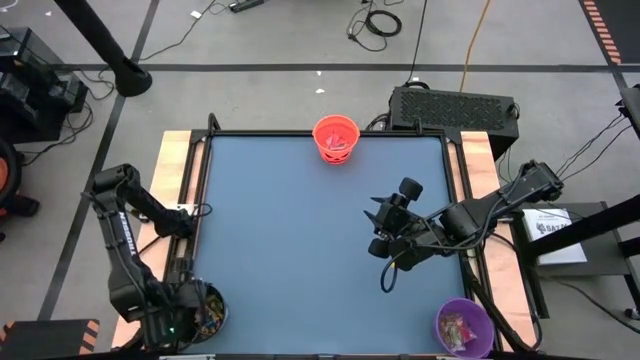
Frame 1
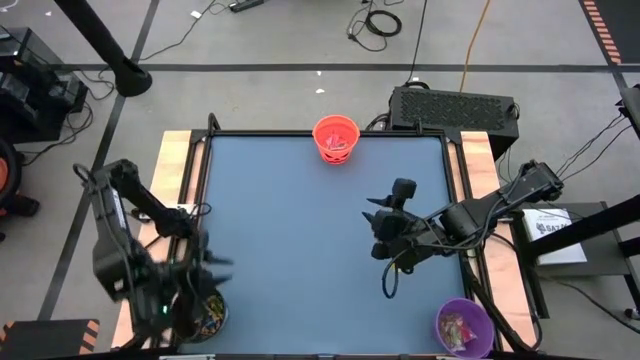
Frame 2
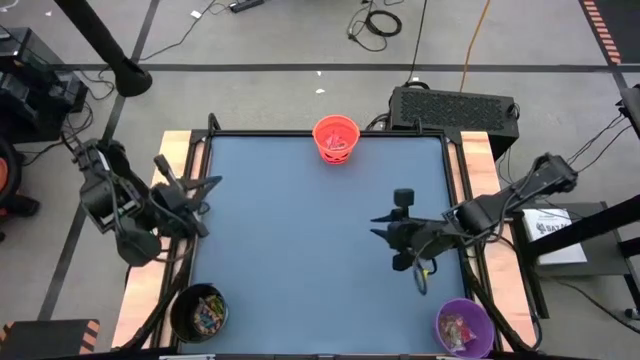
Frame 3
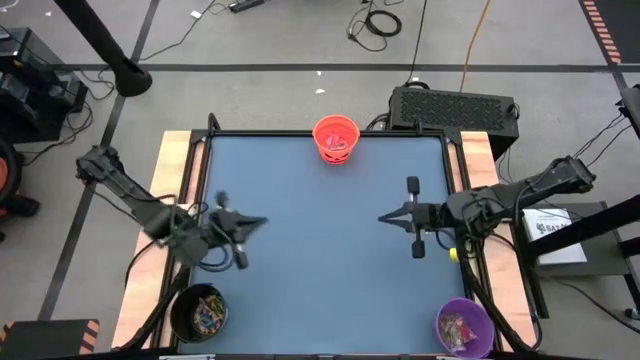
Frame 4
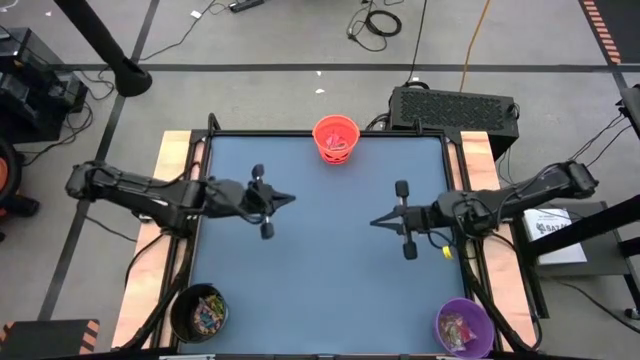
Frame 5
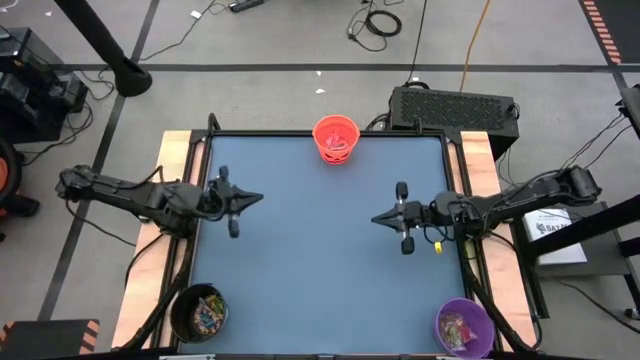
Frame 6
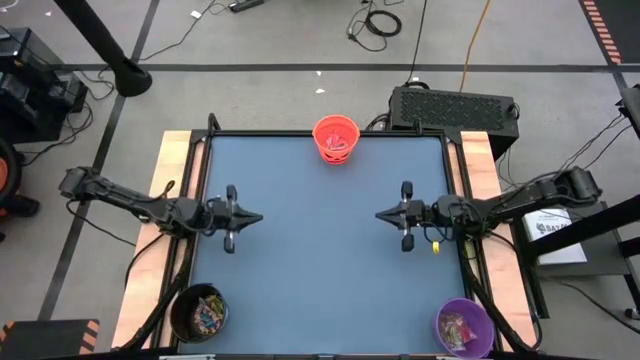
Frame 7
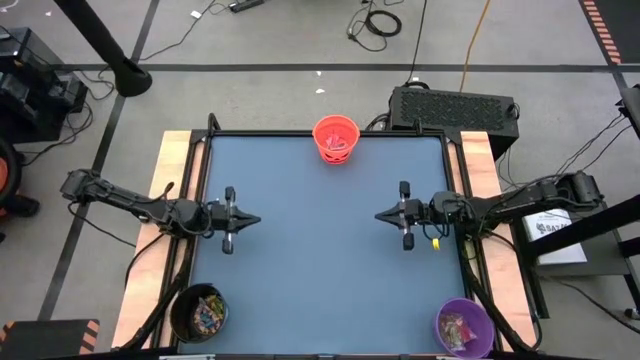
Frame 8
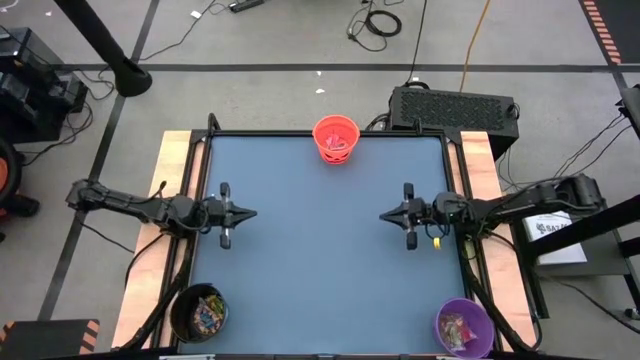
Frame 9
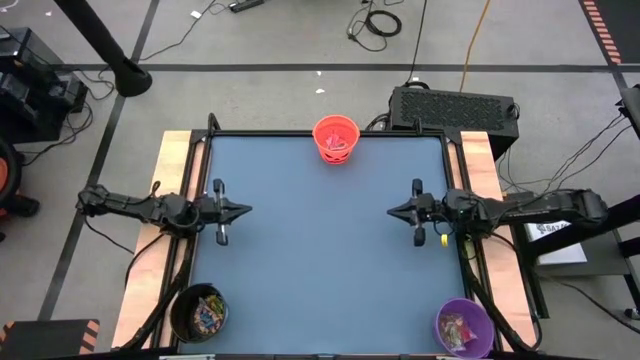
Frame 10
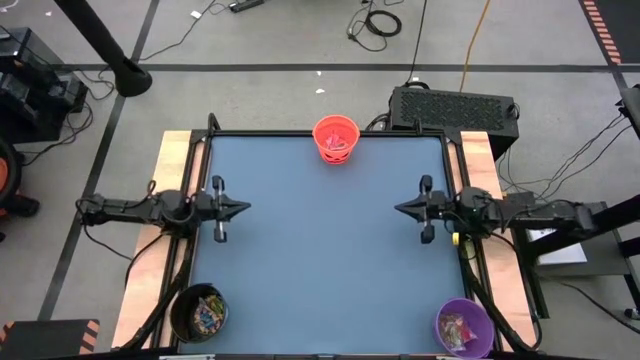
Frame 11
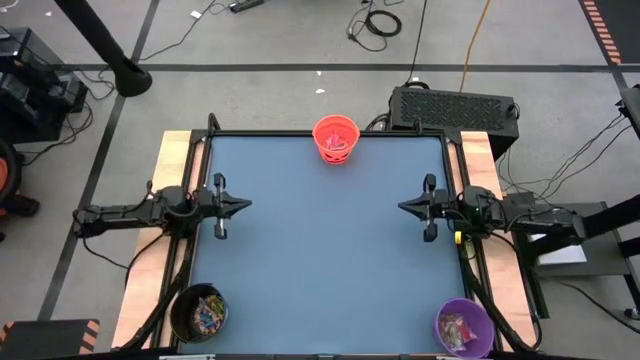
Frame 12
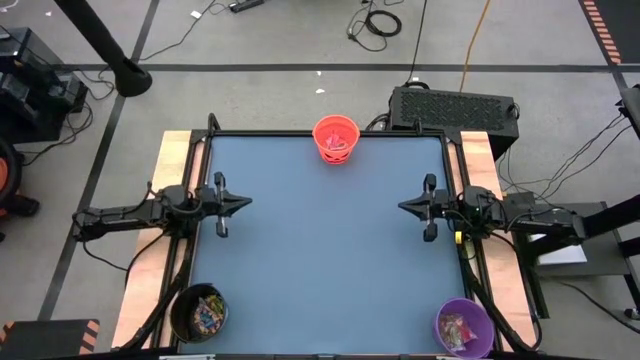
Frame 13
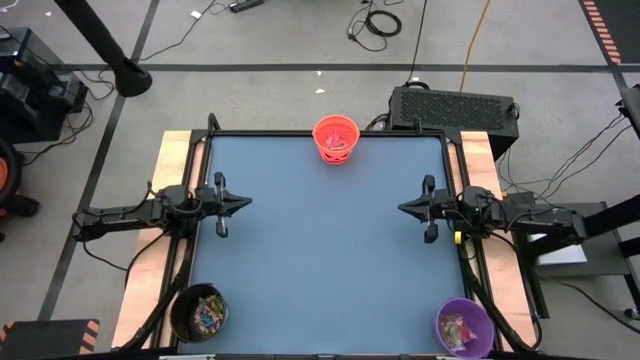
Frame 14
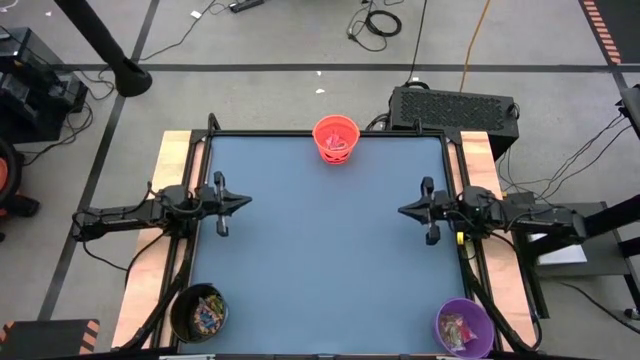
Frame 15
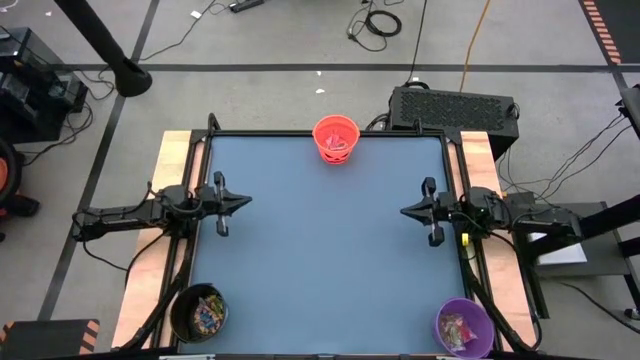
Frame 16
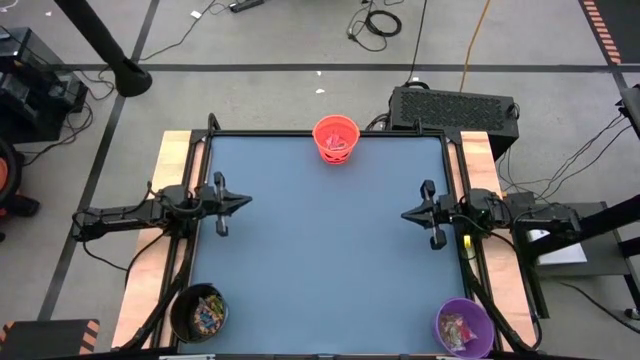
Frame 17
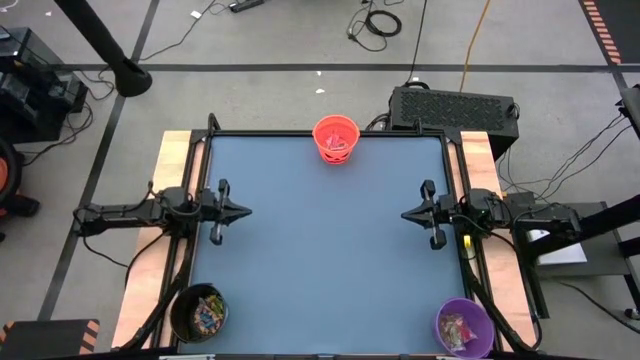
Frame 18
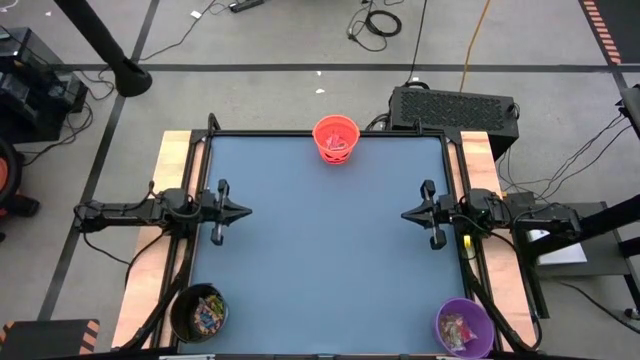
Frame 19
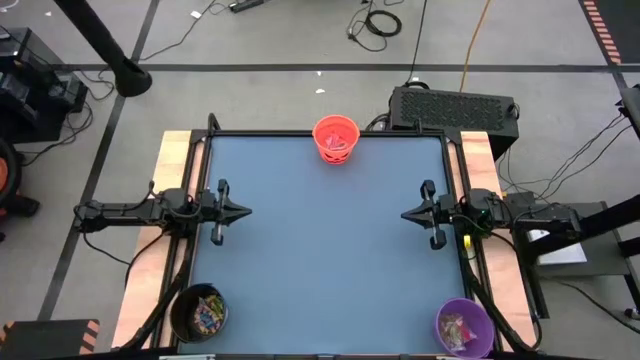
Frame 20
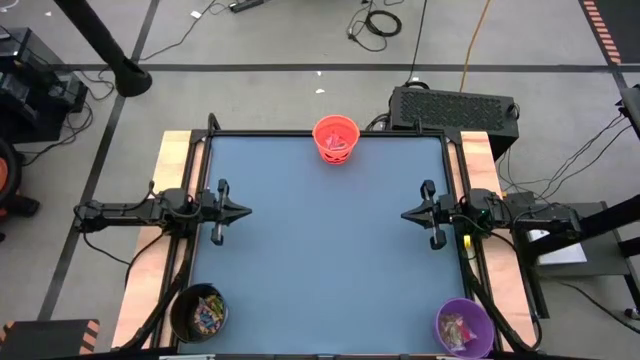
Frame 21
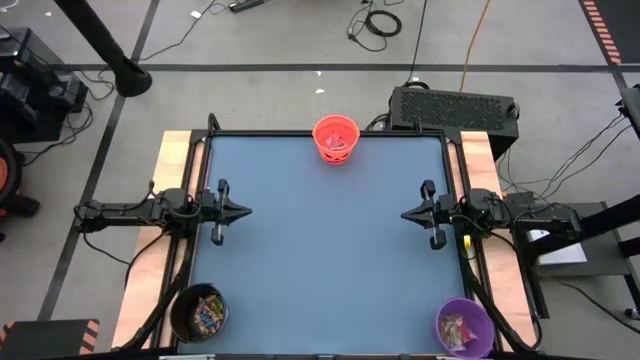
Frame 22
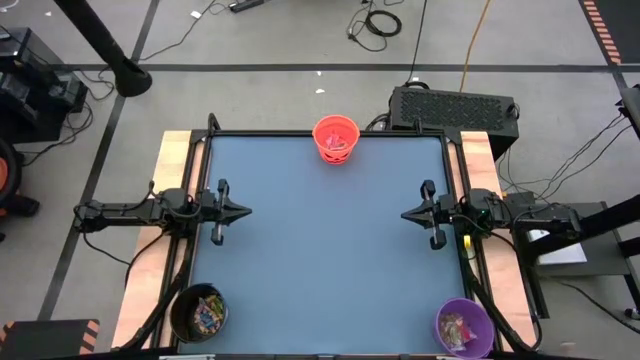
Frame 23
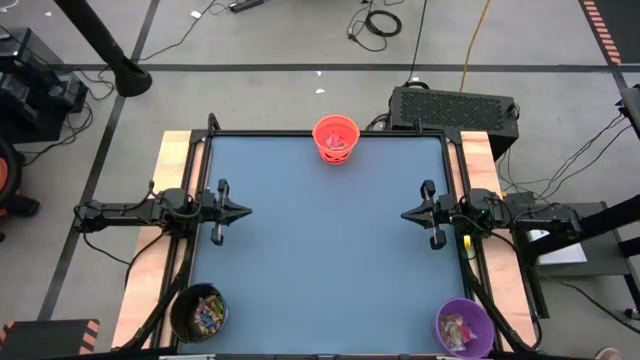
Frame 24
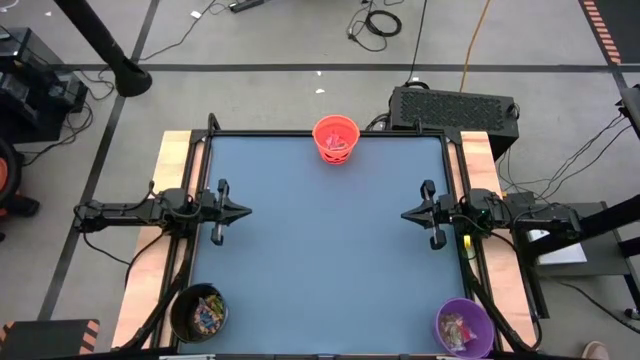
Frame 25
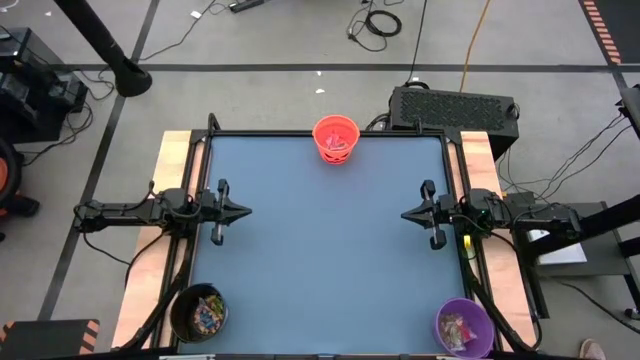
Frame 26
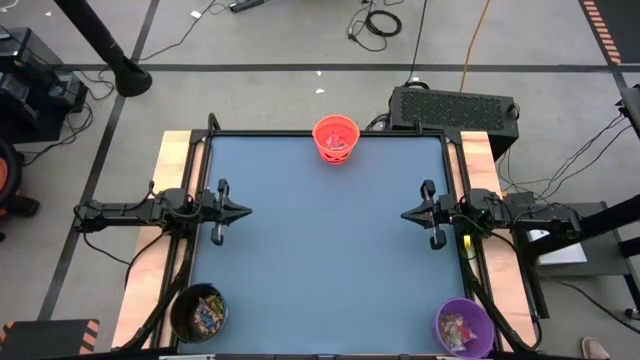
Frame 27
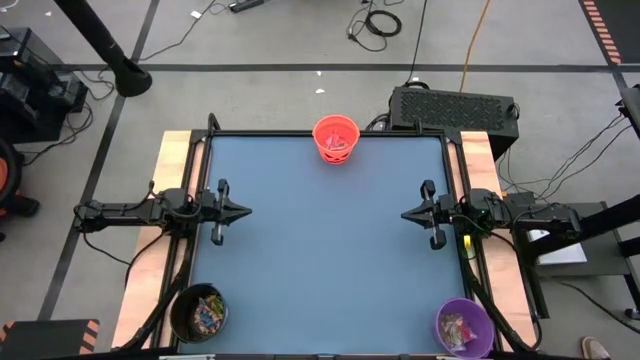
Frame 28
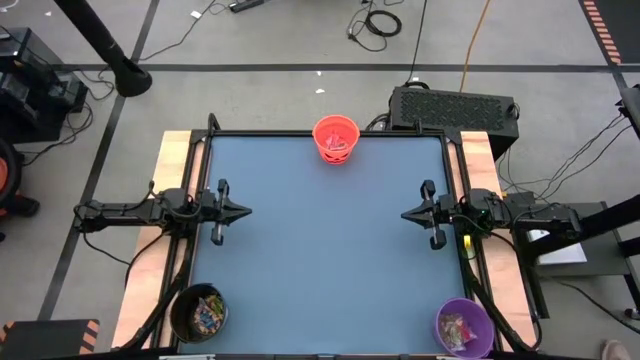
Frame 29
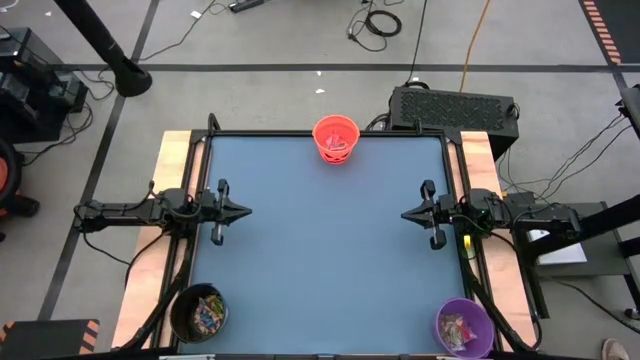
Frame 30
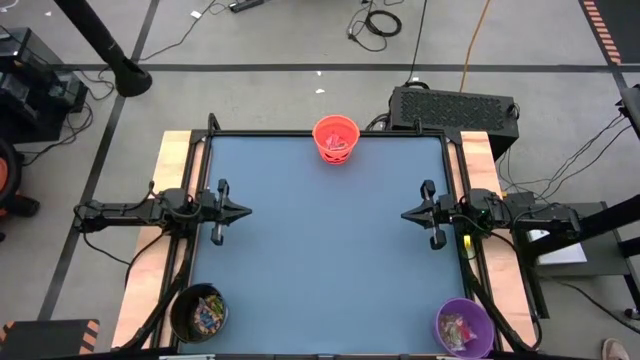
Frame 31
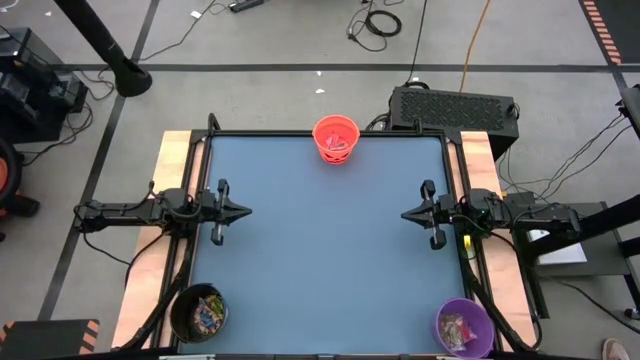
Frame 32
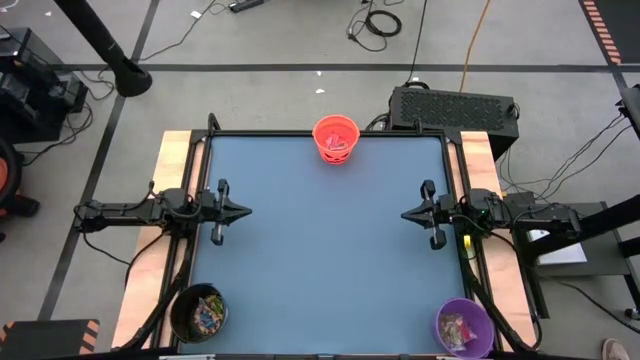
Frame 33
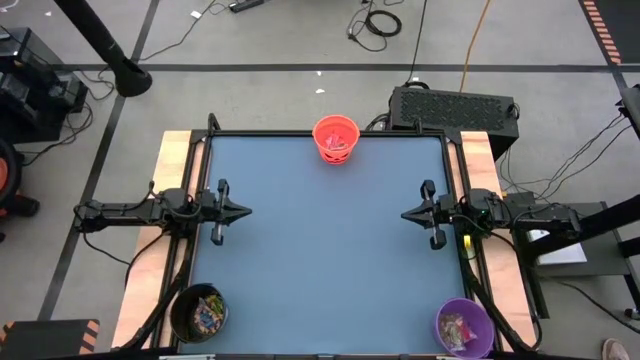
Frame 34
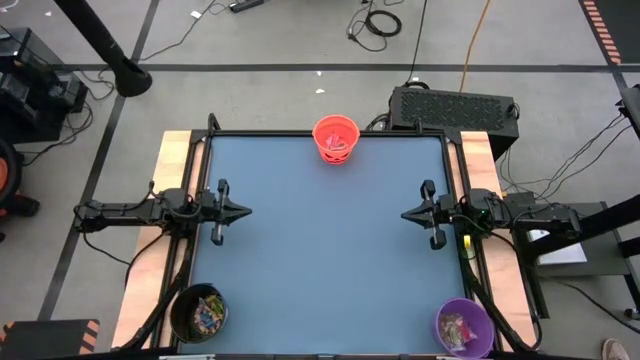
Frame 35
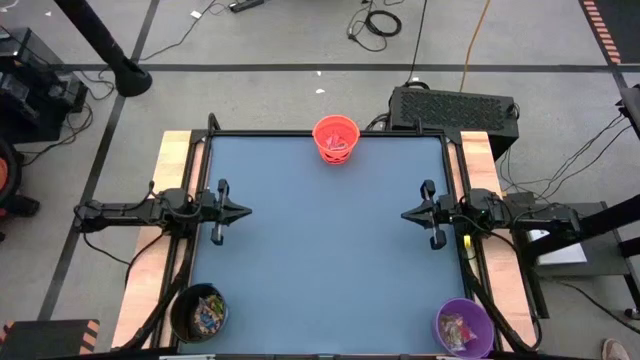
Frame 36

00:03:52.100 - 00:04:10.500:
Task: Sort candy by brand, put in halloween buckets
Return to Home Position
